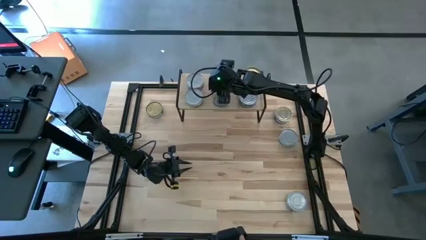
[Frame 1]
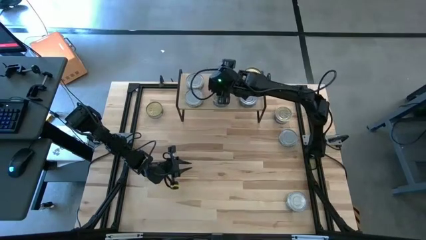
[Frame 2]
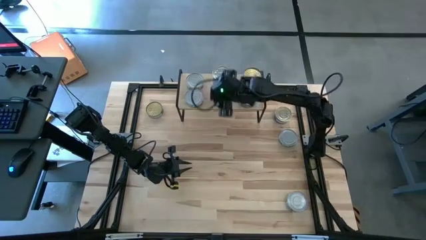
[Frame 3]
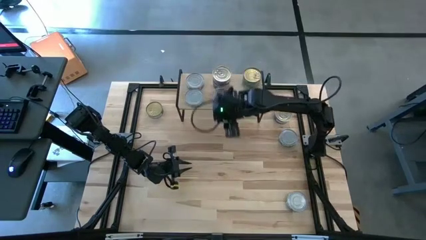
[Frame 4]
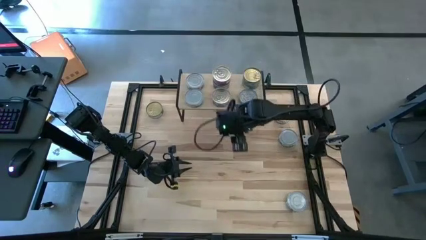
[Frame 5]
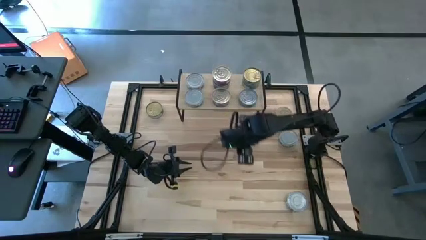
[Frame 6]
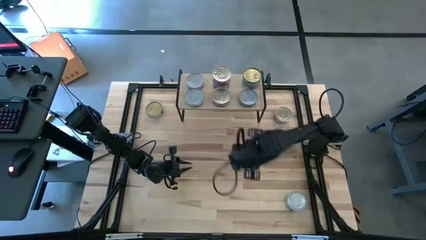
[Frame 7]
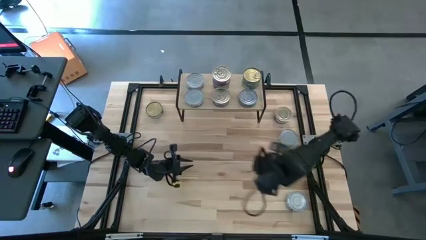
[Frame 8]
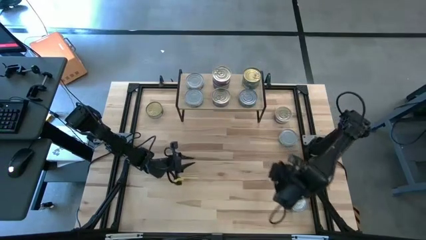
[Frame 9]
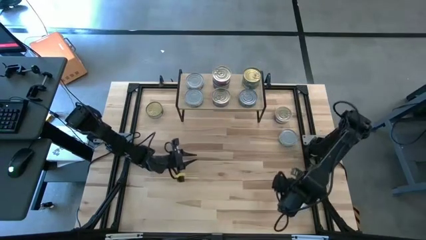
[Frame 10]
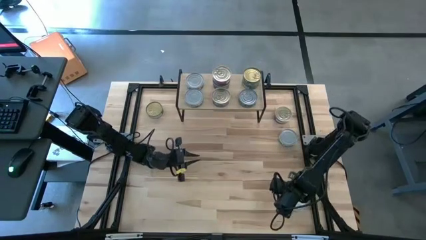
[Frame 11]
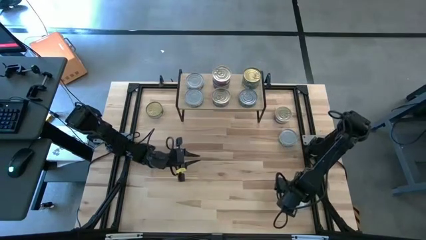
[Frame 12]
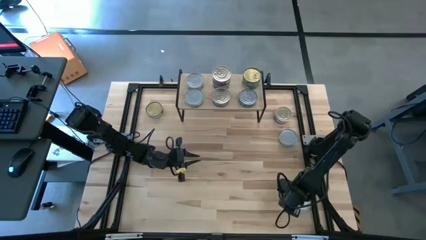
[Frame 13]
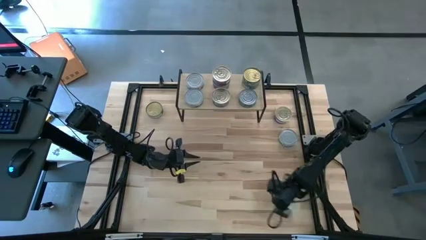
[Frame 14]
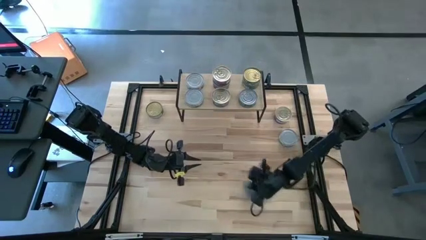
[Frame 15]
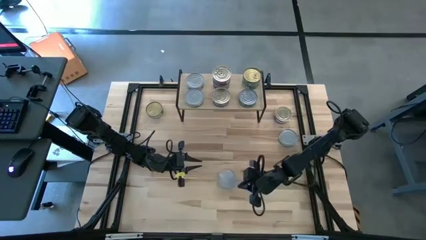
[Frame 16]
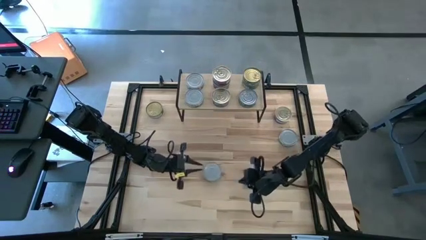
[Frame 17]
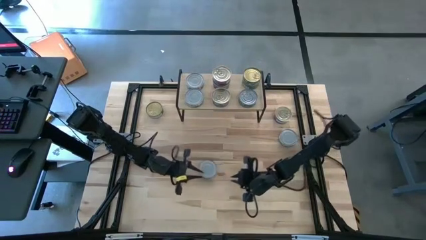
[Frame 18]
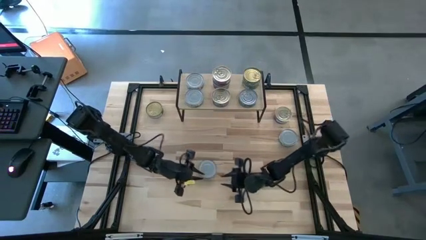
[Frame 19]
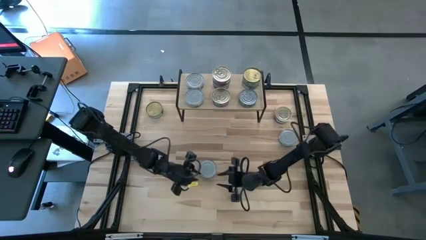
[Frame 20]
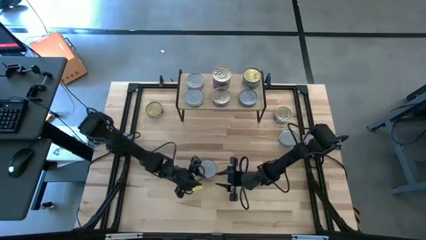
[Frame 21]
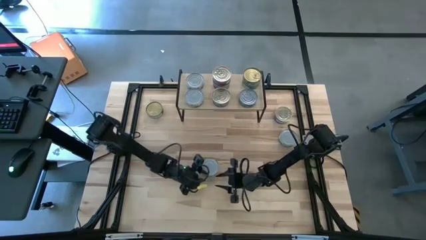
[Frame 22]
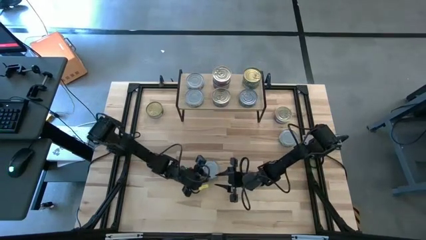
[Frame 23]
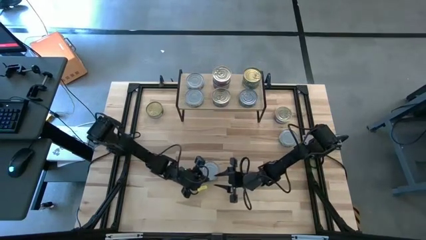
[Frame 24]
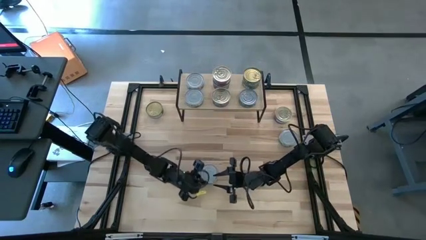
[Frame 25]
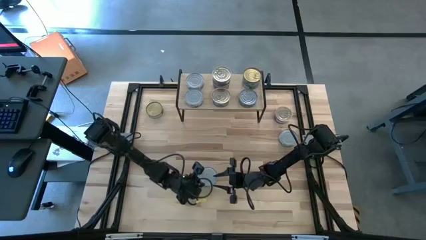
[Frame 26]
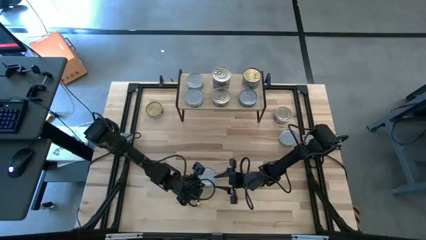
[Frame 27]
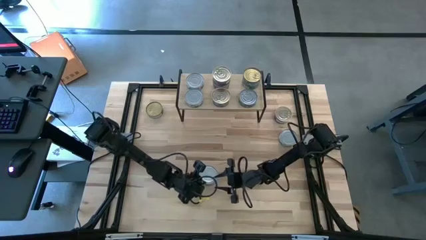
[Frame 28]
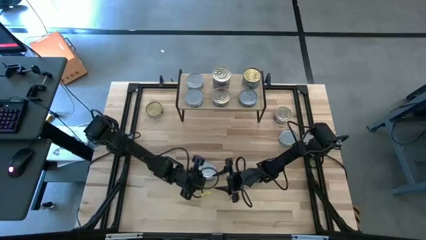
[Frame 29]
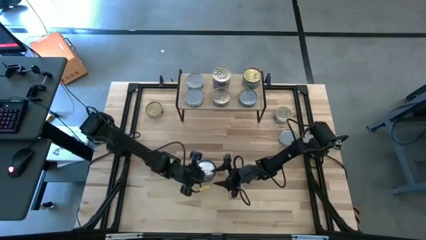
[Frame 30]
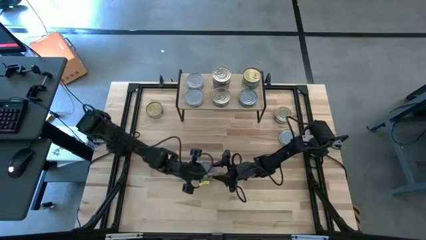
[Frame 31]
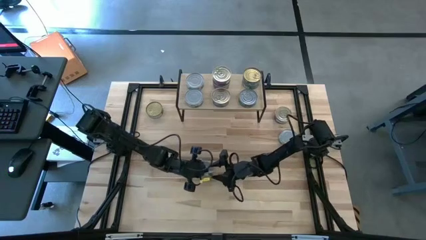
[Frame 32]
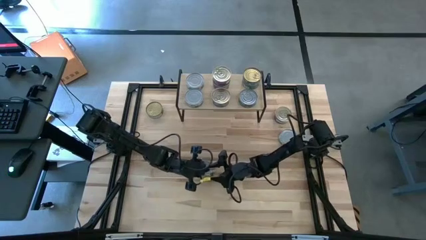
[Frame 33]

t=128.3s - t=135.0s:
Task: Stack canned seafood by type on shelf
Stack the green white tuna can on top of the other green white tuna can on the shelf

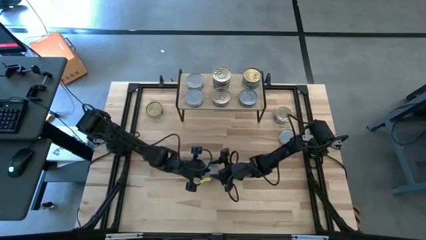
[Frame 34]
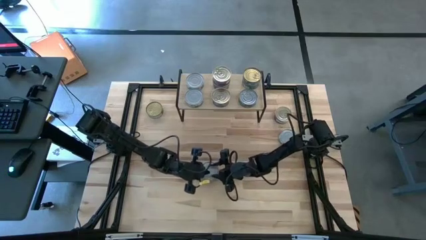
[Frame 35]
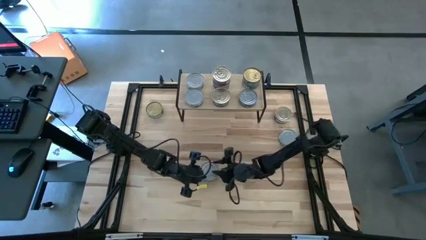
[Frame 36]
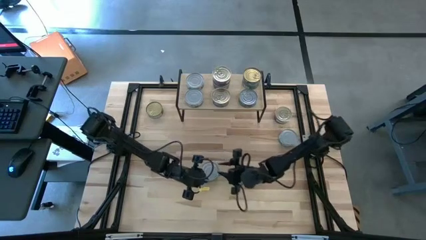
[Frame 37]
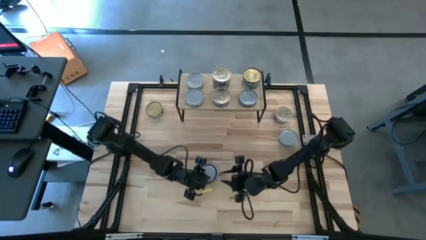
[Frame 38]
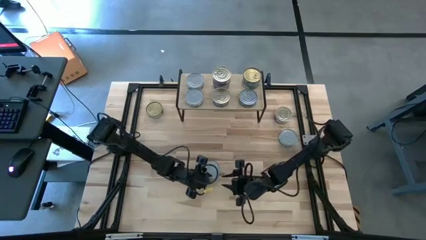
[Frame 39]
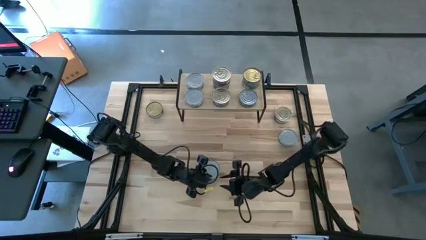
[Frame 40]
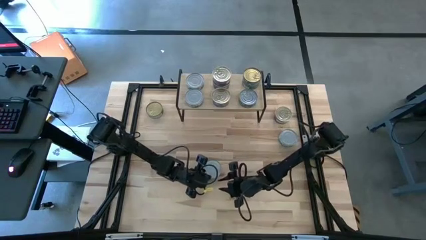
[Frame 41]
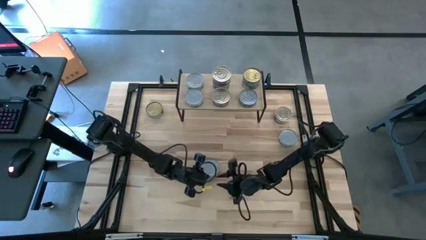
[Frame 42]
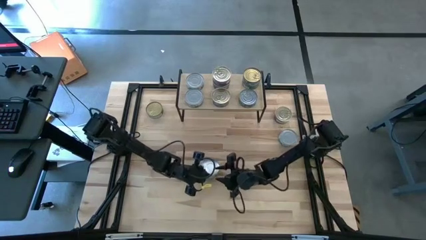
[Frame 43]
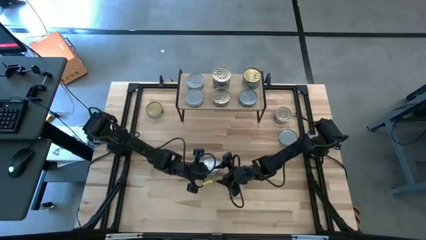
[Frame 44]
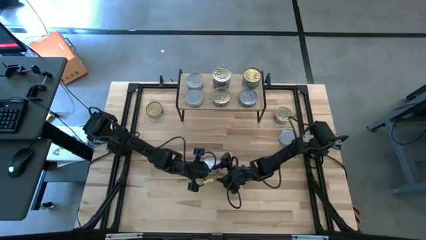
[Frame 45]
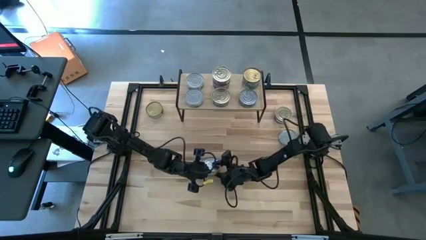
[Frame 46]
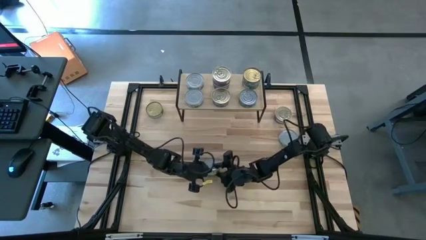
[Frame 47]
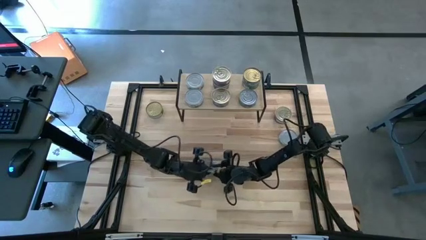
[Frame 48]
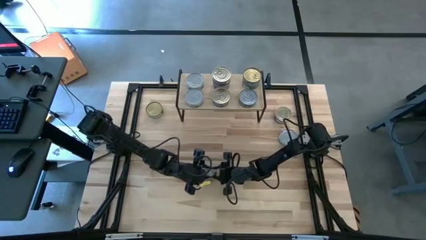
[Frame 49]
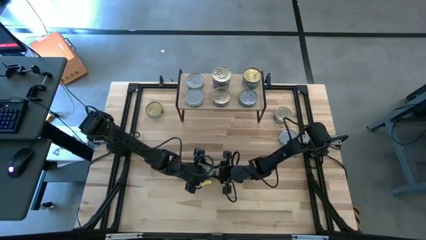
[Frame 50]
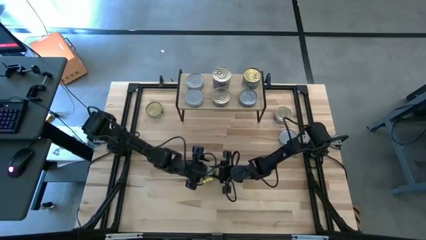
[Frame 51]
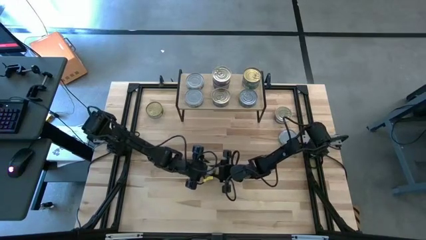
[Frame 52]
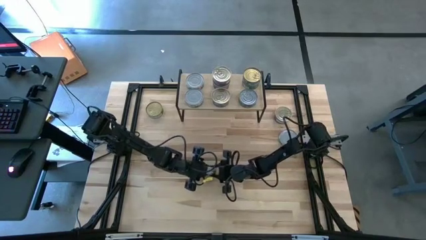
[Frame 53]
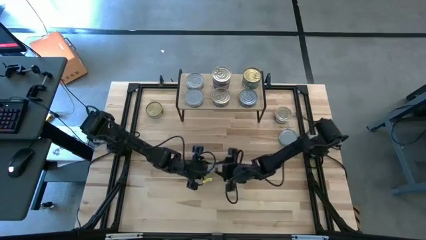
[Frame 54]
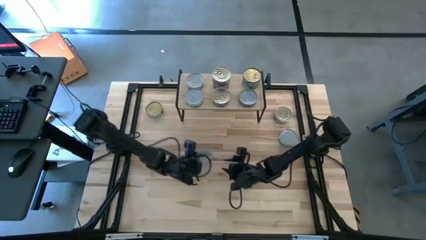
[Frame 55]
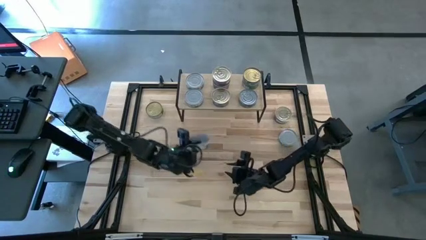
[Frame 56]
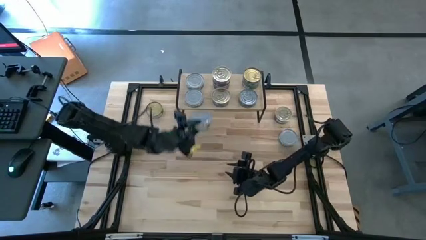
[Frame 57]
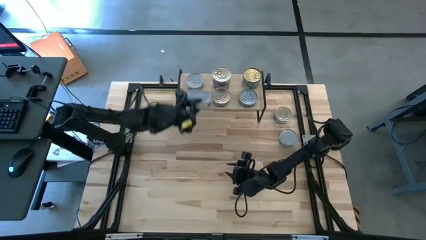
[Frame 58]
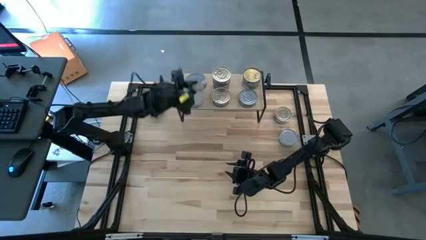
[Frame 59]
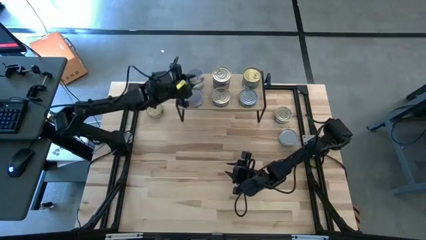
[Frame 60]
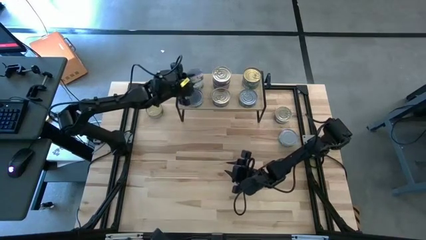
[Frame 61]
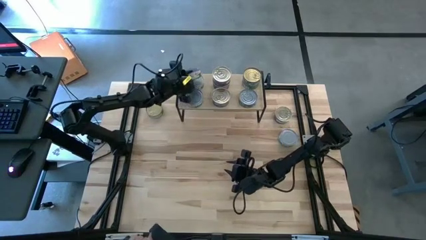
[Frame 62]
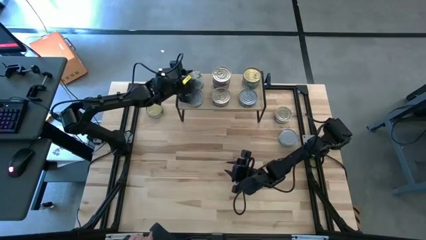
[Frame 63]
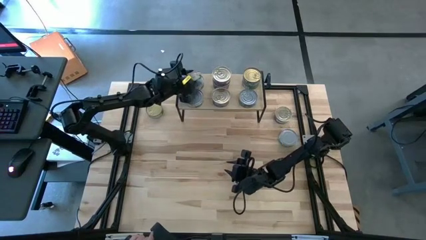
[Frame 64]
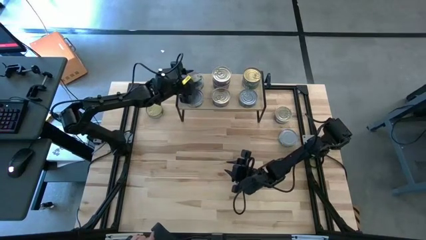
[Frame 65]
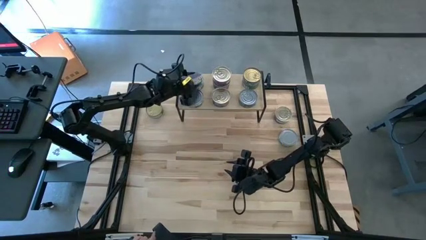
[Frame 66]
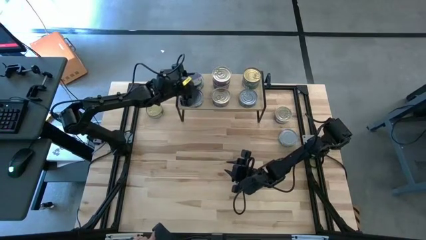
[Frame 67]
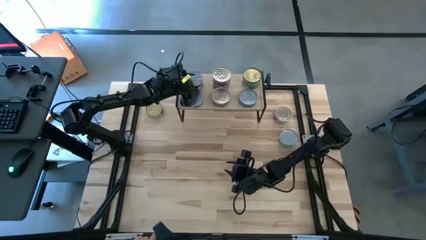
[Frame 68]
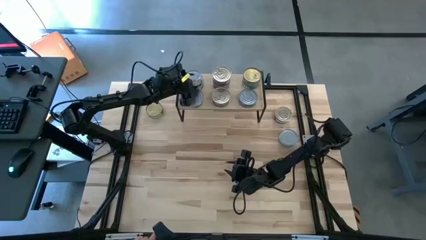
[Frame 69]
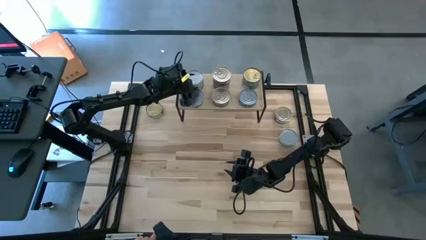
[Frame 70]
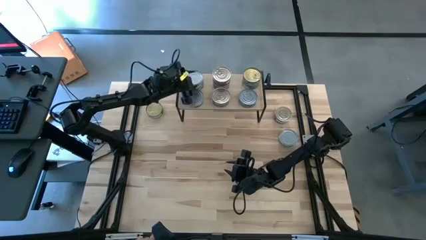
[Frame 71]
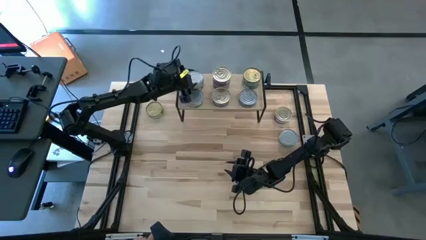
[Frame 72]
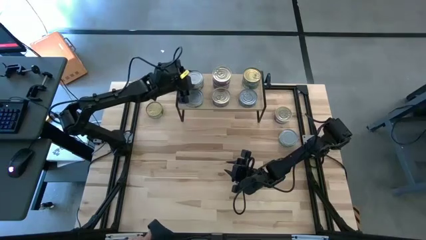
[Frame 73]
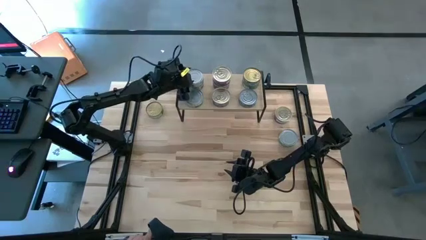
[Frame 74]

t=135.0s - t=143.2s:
Stack the green white tuna can on top of the other green white tuna can on the shelf
